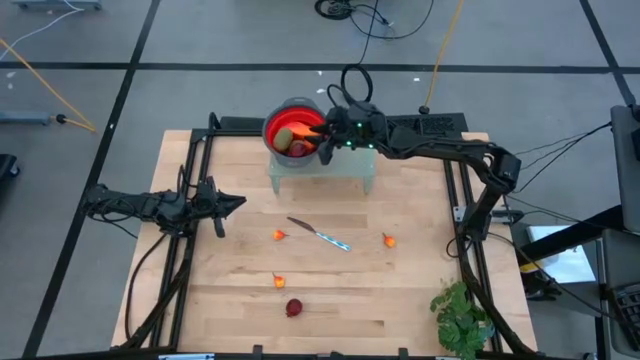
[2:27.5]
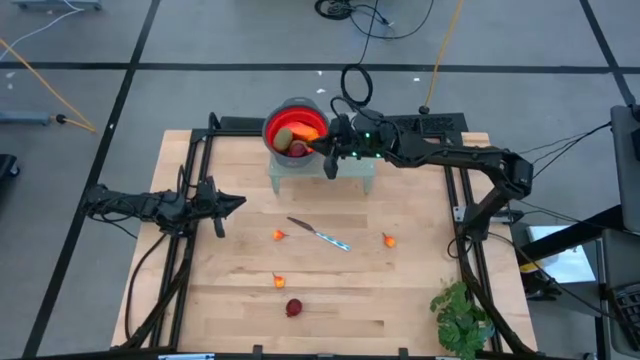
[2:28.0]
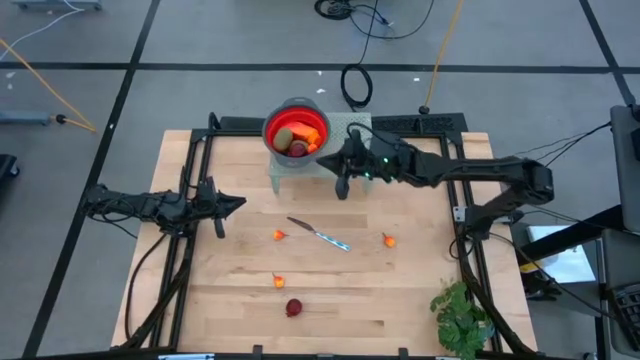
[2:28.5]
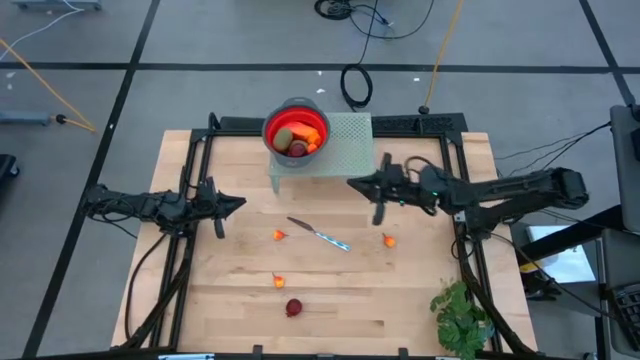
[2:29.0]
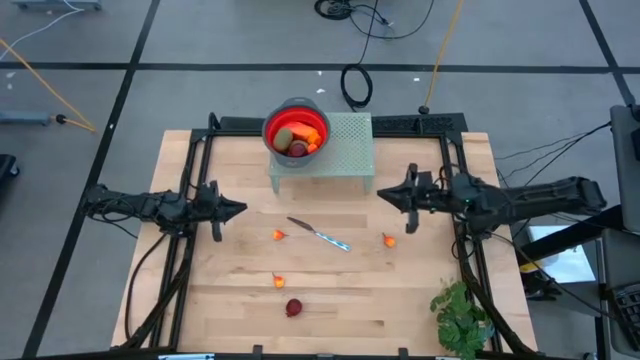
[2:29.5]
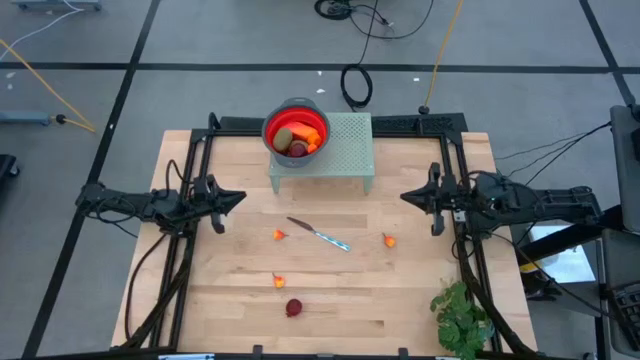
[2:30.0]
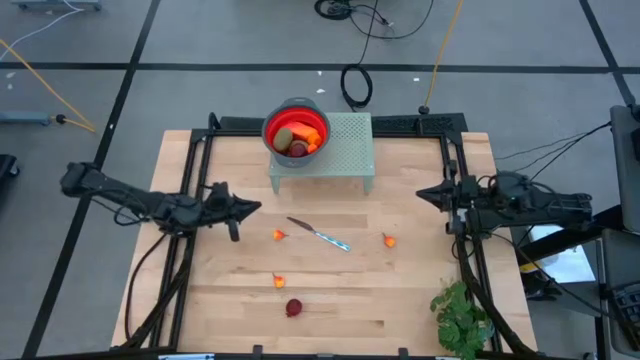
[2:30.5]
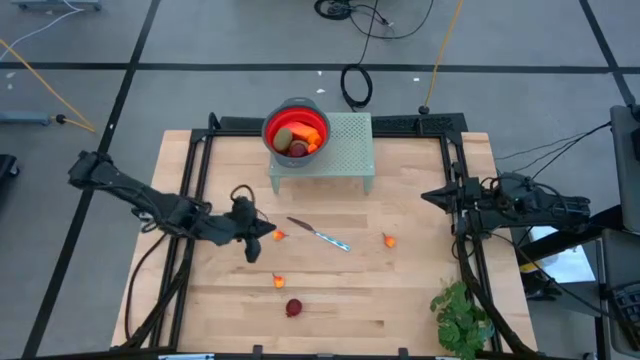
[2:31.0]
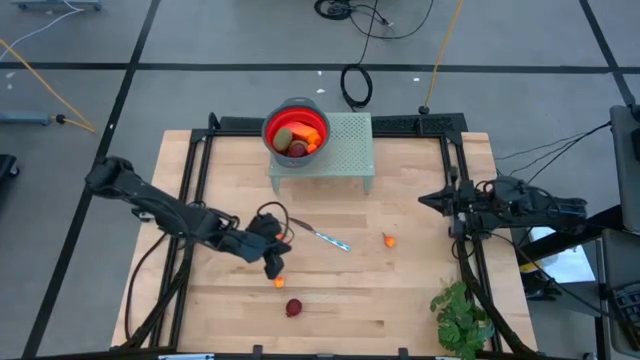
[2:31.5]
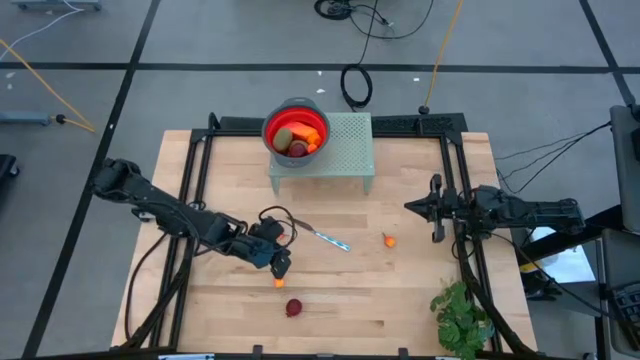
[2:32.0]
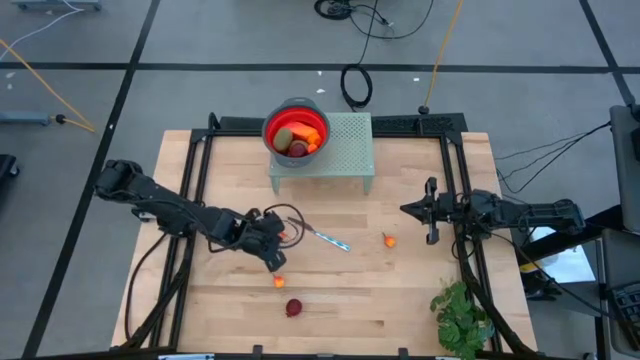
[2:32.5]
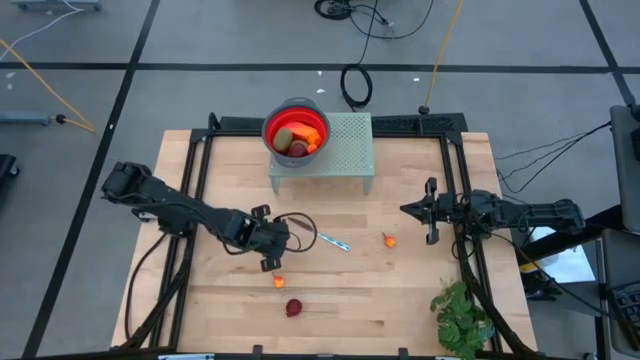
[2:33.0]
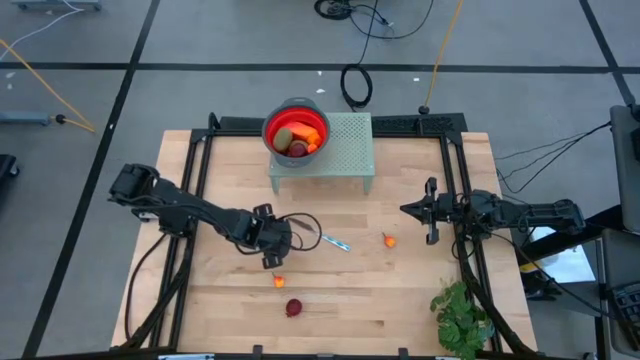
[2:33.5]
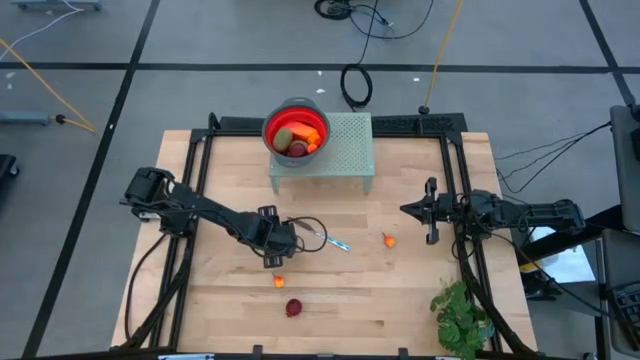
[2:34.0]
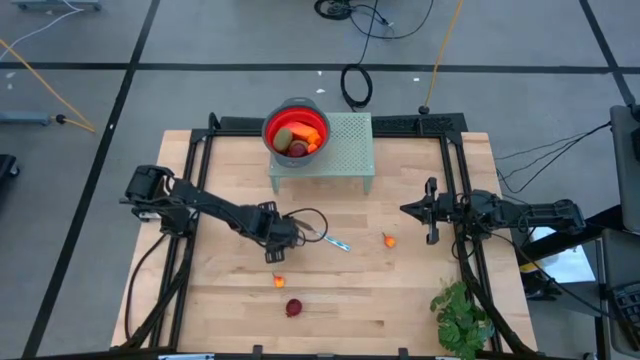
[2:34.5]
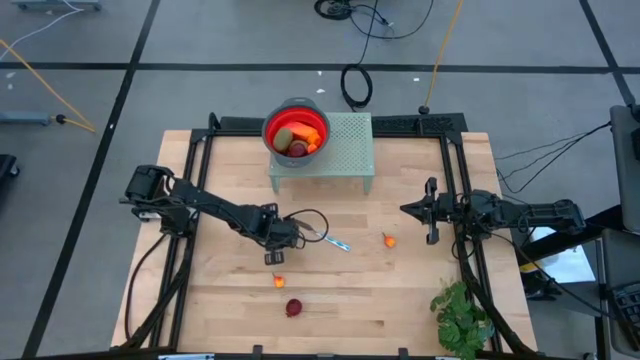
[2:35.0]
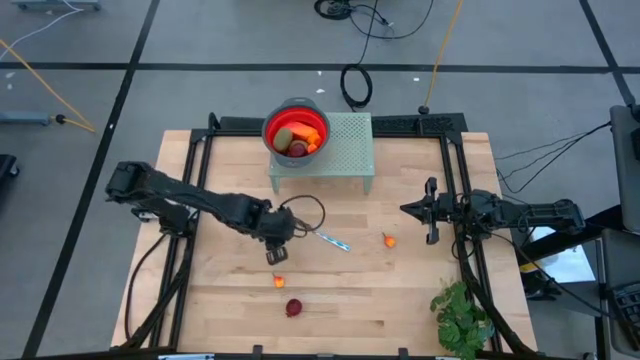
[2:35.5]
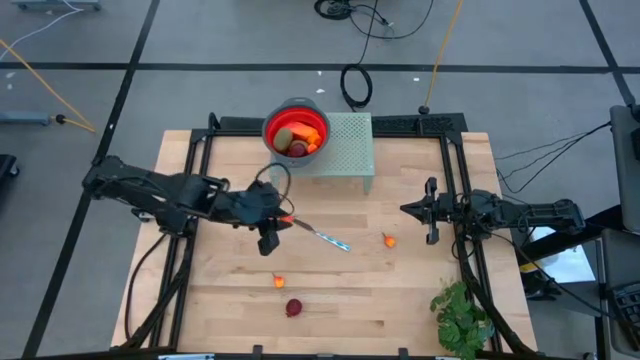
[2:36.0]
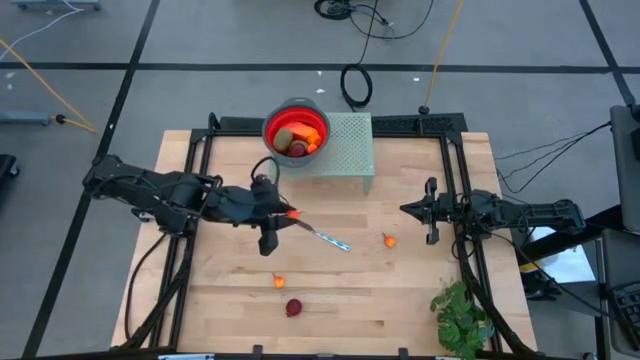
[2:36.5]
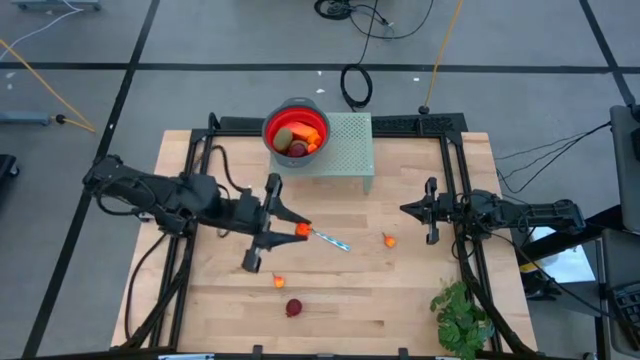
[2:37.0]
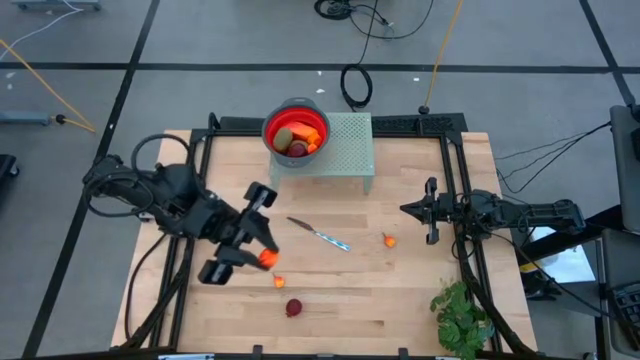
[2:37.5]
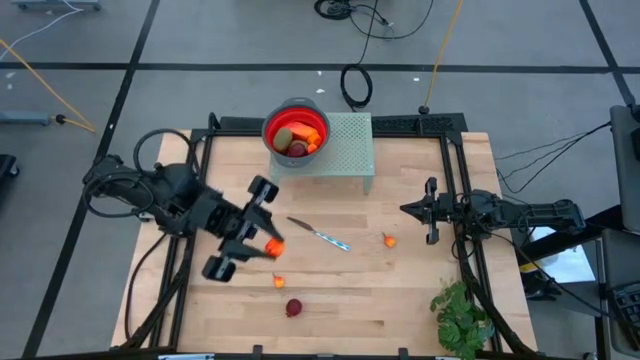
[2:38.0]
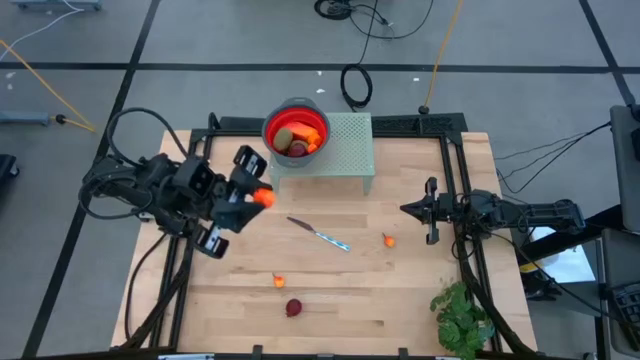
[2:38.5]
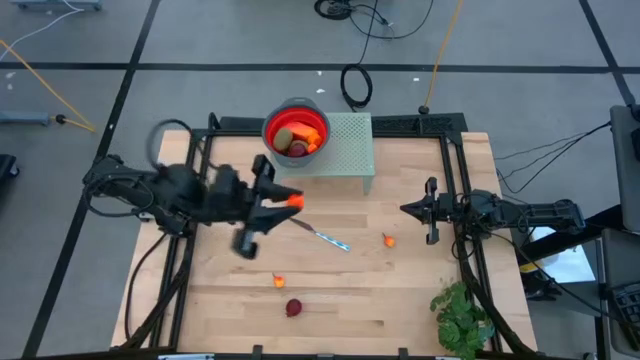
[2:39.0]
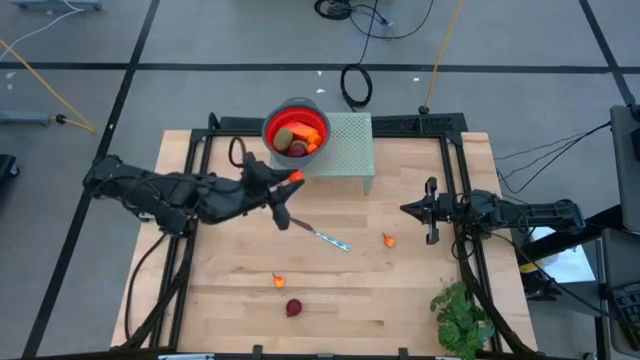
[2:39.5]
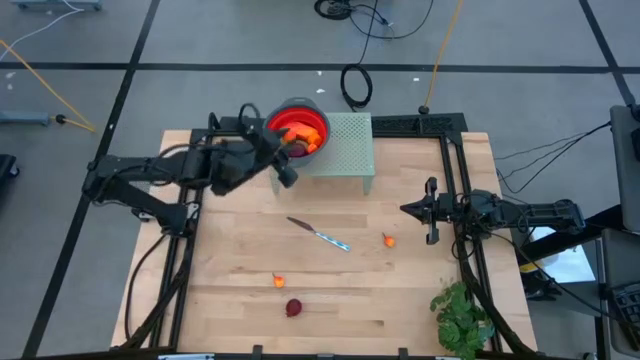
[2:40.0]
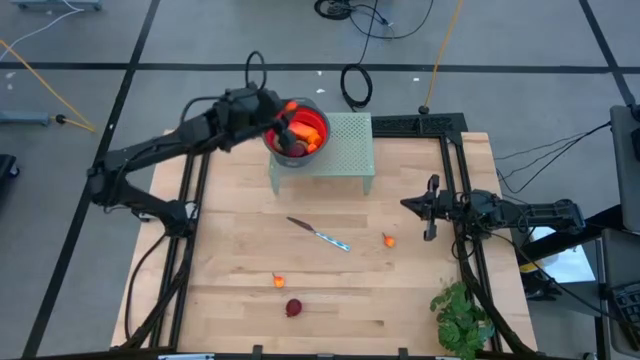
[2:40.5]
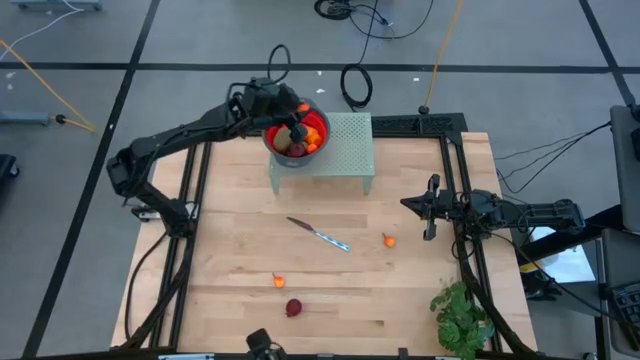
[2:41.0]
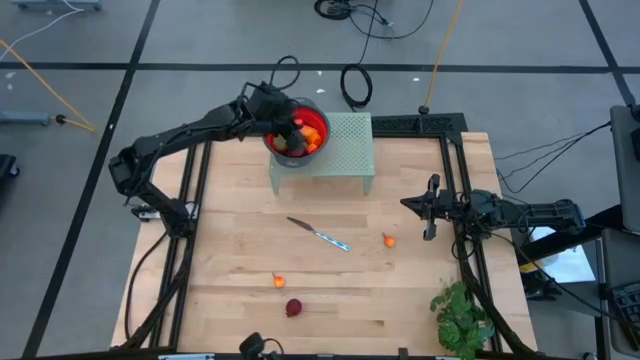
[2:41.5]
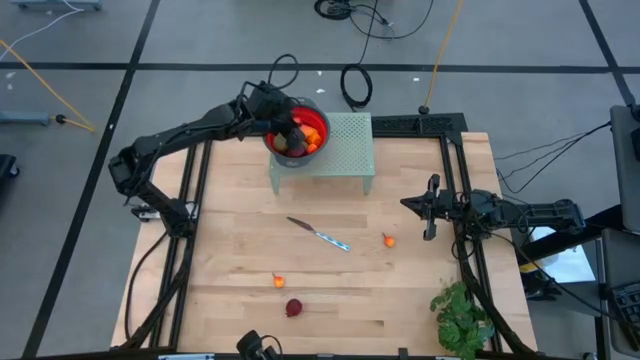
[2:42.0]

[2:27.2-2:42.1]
Task: Pick & Place Fruit
Put the peach into the red strainer bowl

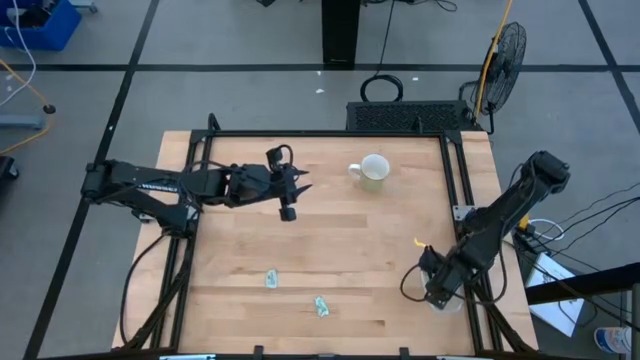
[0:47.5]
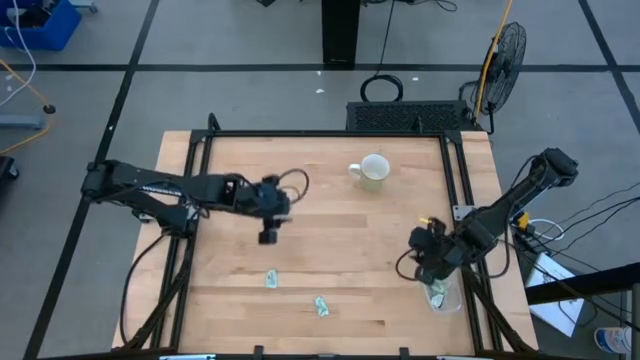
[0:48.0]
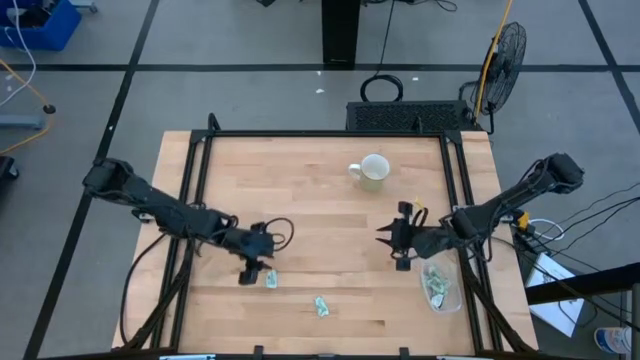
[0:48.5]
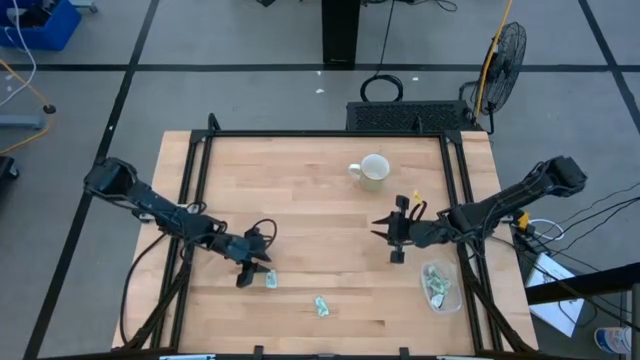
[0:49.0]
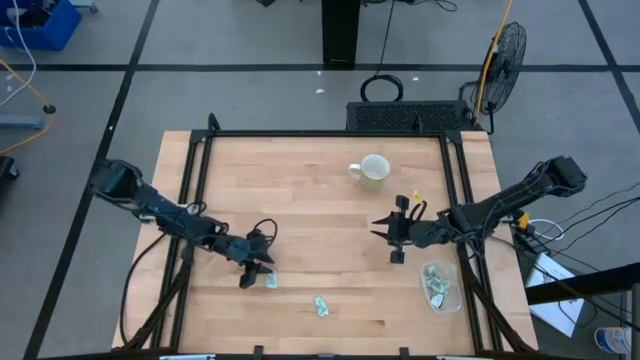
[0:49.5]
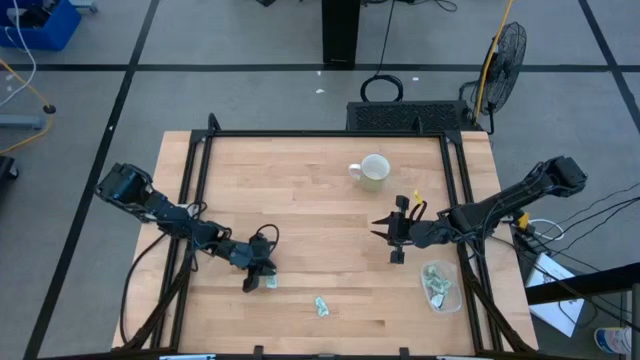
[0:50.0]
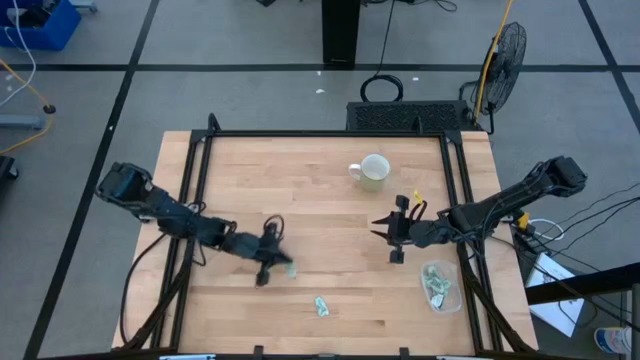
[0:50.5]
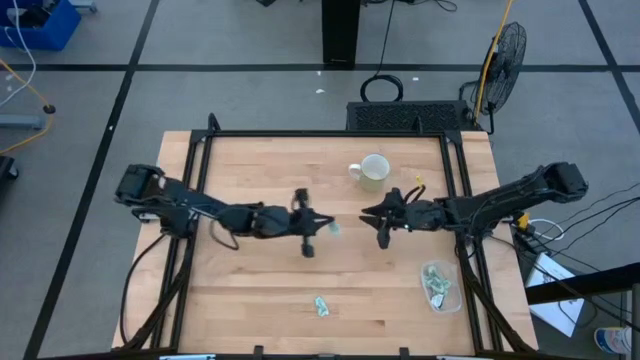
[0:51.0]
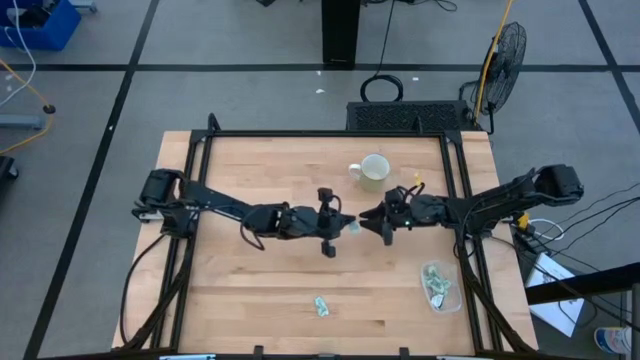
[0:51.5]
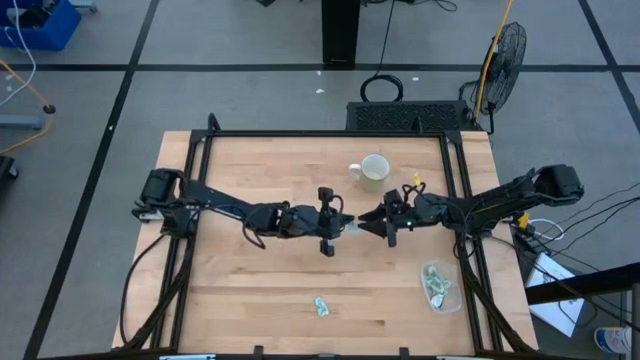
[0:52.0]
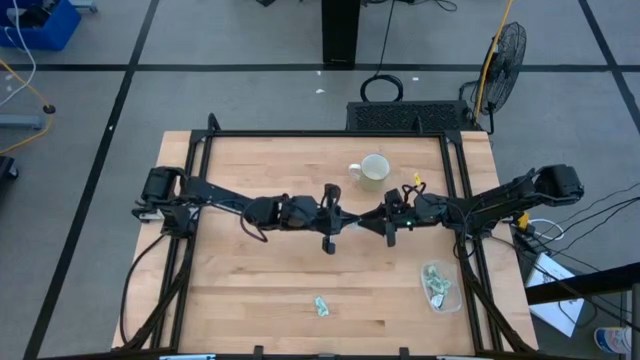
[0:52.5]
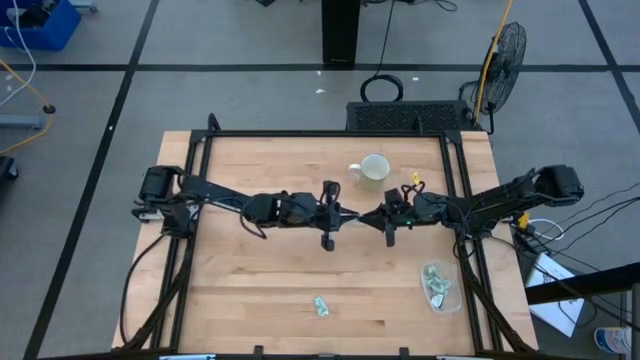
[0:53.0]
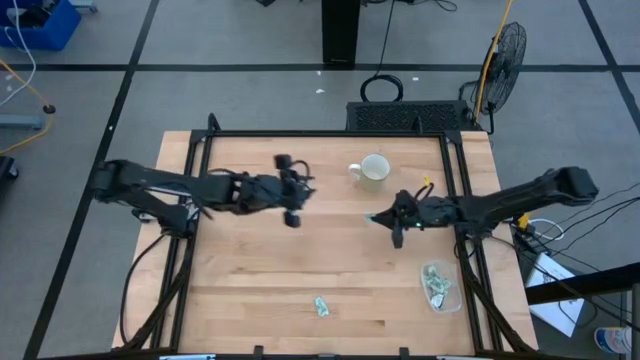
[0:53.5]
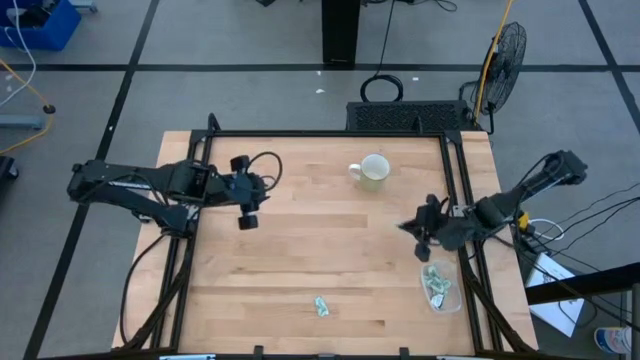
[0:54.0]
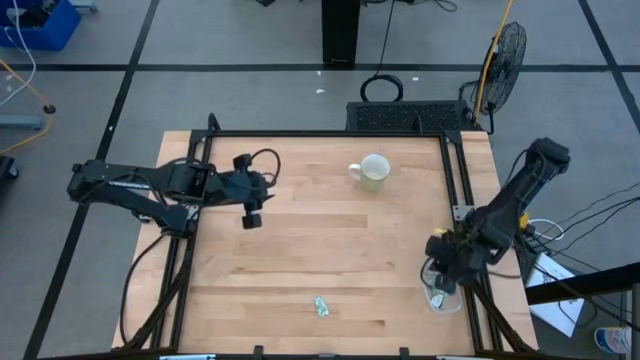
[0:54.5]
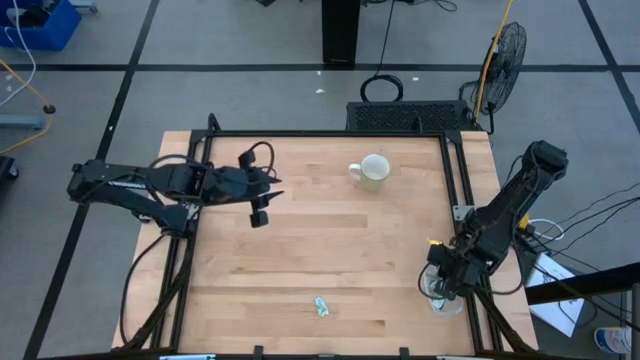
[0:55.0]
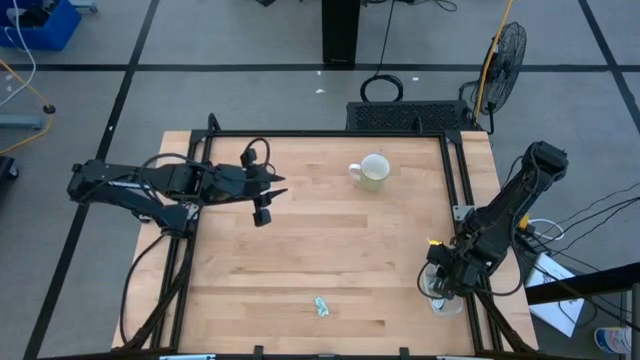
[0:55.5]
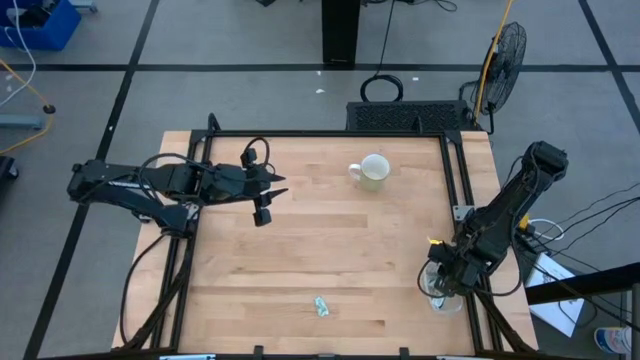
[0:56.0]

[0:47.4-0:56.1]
Task: Pick and place Stevia / Truvia into bins
Put the stevia packet into the transparent bin
